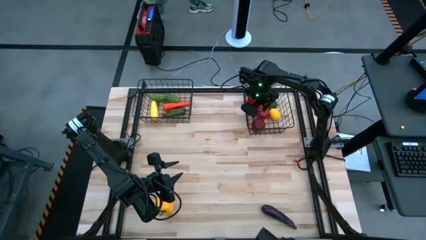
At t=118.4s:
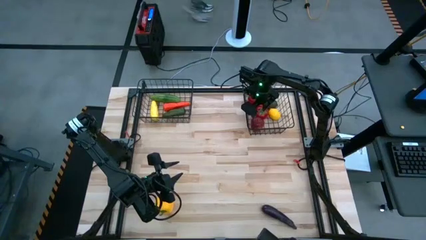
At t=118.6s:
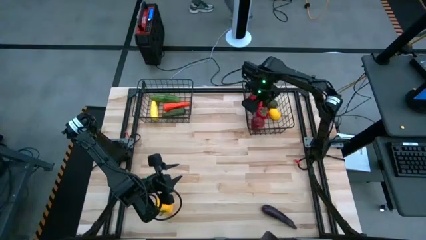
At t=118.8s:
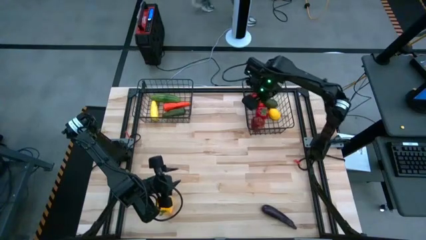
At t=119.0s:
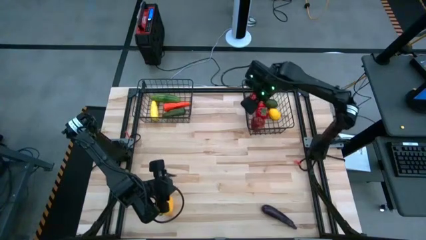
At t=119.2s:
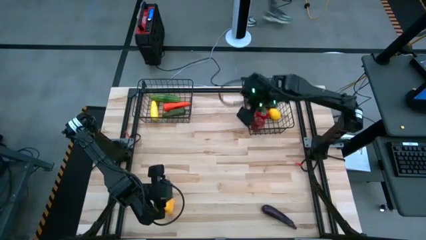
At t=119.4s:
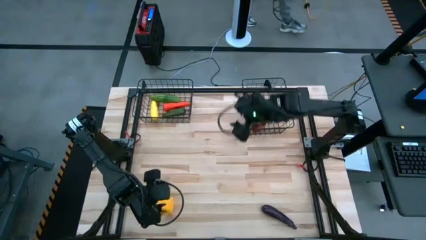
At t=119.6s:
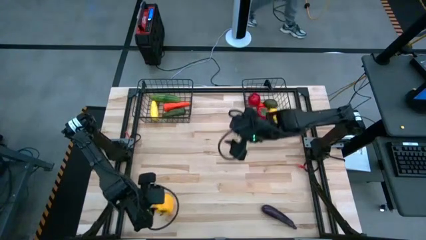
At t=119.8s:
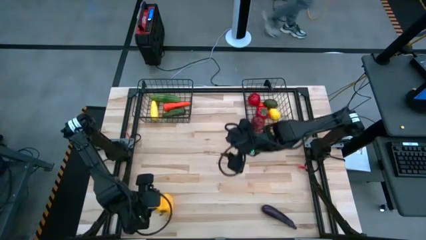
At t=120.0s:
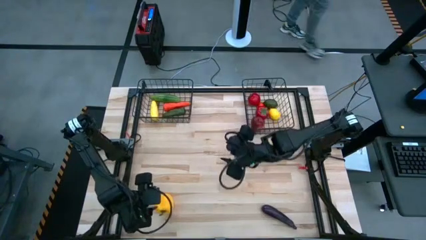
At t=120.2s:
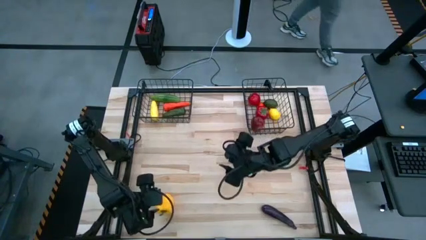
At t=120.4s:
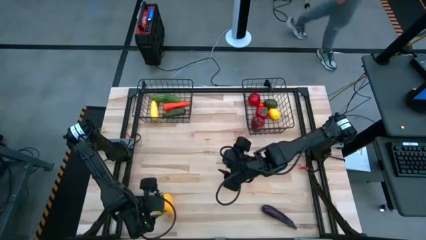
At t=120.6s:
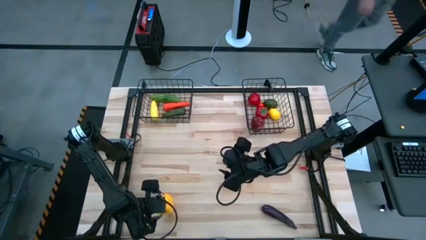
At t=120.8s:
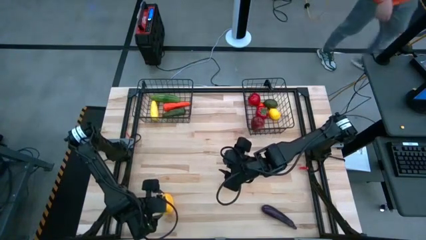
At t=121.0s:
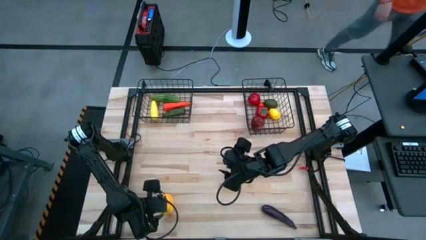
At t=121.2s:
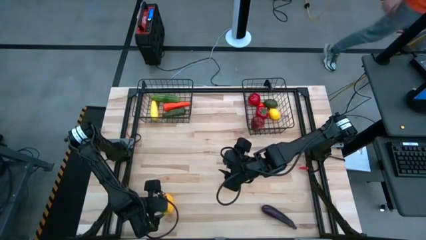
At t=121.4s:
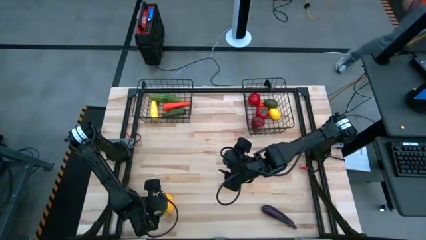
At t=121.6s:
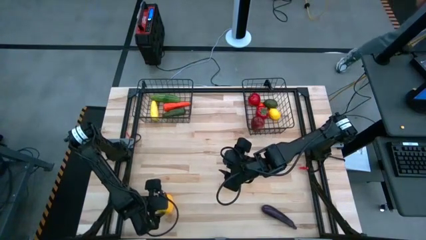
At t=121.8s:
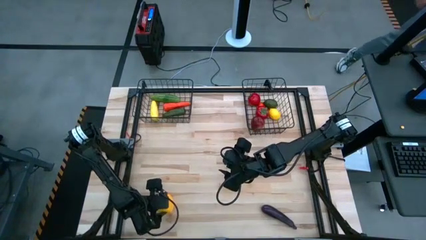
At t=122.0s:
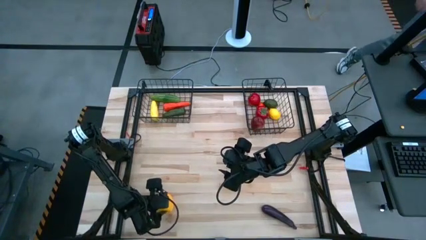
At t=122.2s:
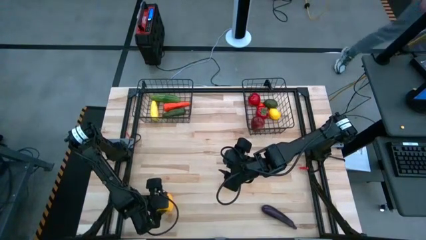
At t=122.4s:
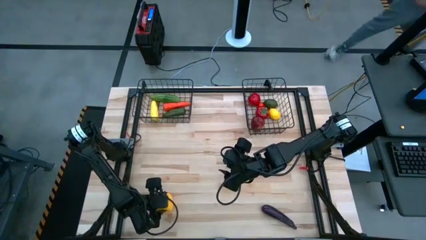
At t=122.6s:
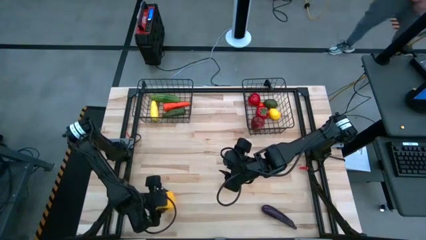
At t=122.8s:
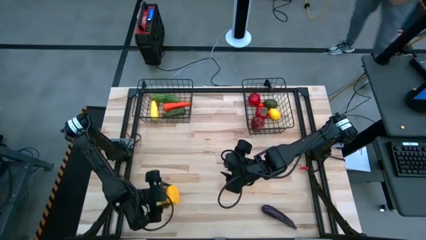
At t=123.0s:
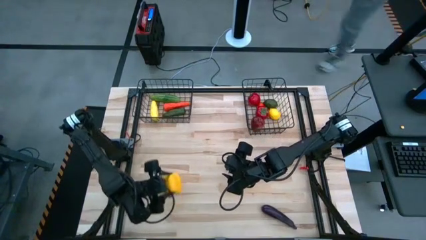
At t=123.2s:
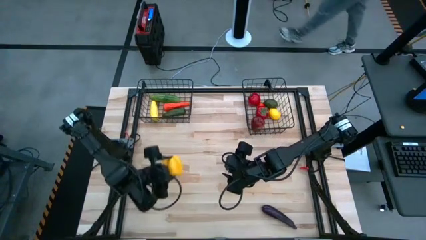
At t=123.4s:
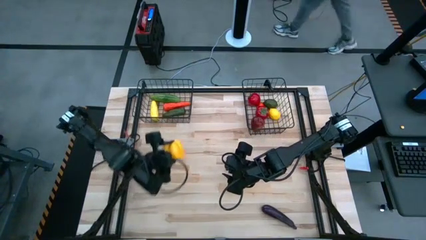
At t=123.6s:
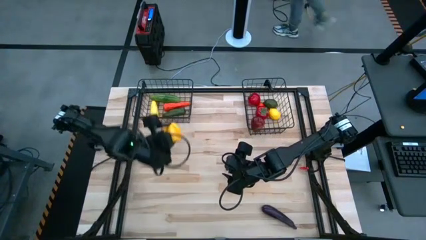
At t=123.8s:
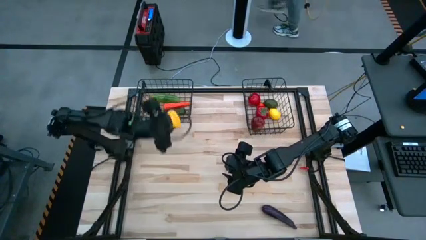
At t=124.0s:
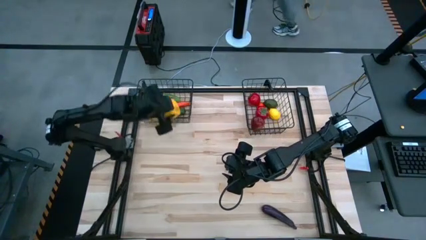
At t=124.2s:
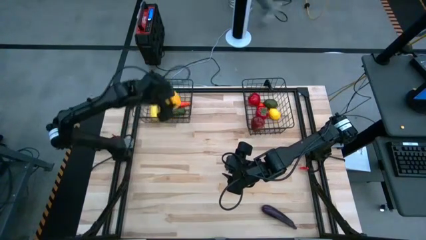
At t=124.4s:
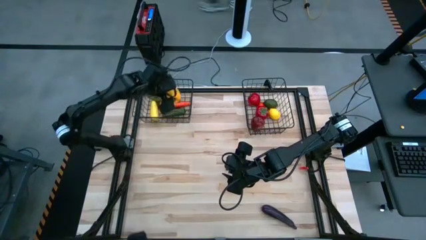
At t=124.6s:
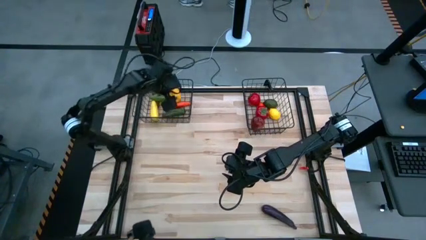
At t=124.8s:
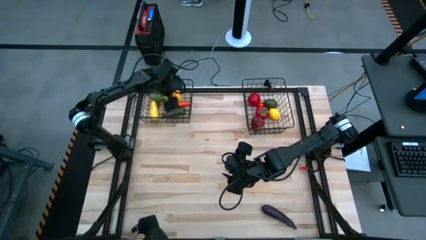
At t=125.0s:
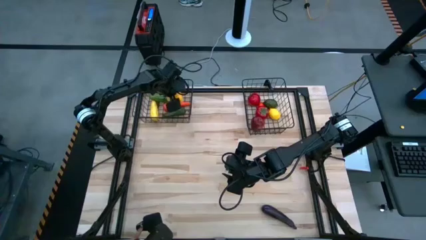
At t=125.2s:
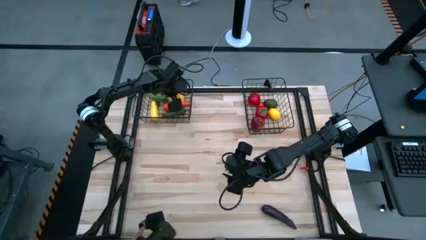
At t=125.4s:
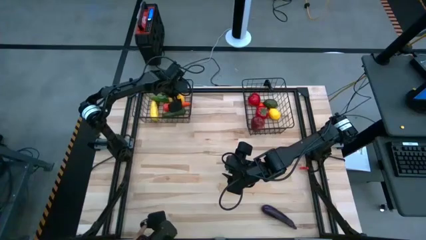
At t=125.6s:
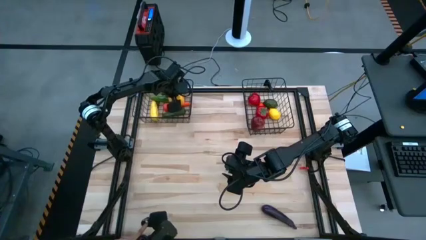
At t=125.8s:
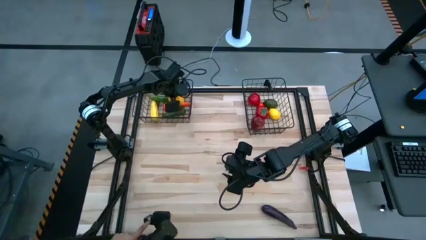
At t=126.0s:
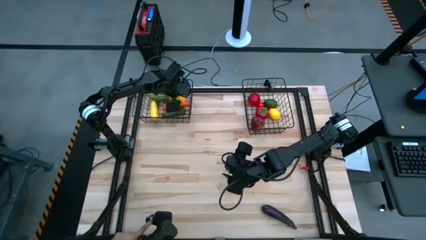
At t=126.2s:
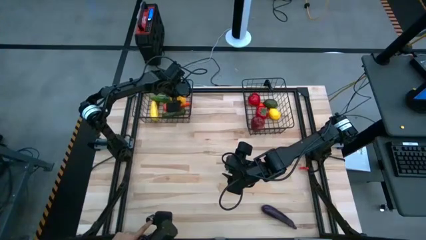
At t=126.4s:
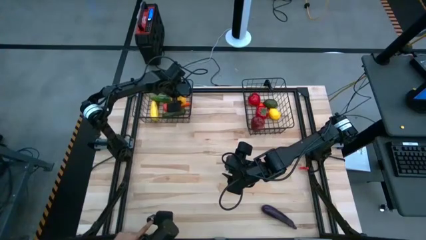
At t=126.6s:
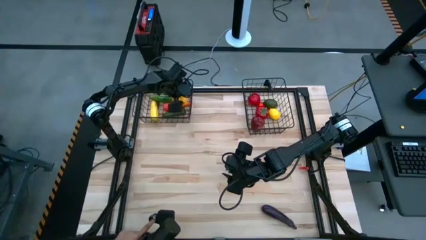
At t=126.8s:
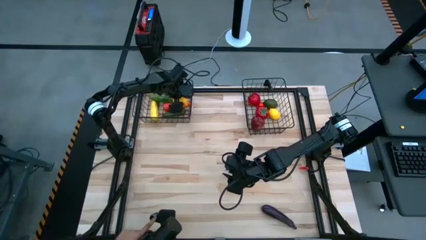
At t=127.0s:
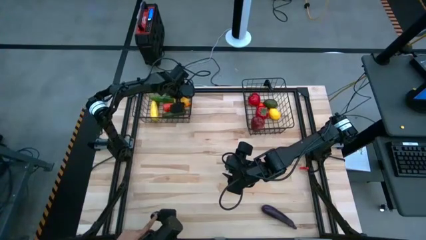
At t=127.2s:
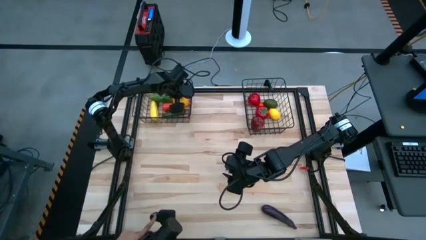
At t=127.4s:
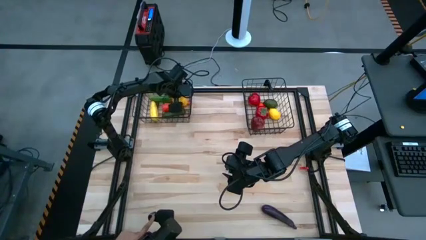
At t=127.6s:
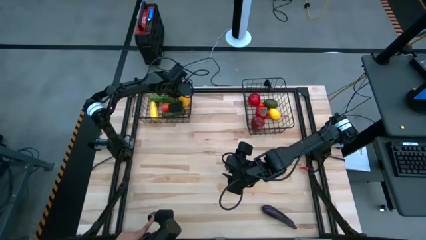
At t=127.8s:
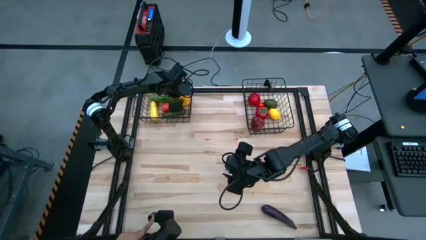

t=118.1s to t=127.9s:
Task: Sort produce into baskets
Put the yellow bell pepper into the left black wire basket

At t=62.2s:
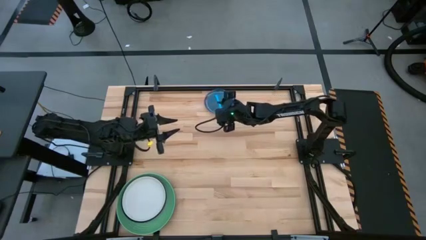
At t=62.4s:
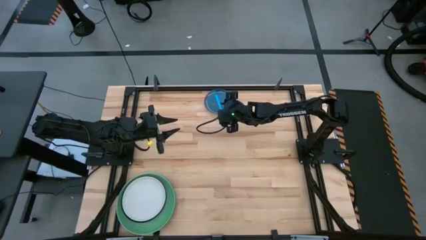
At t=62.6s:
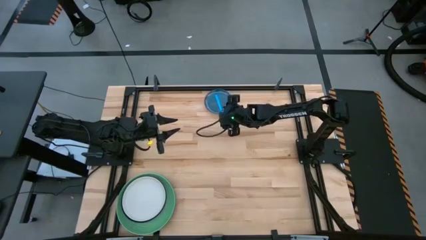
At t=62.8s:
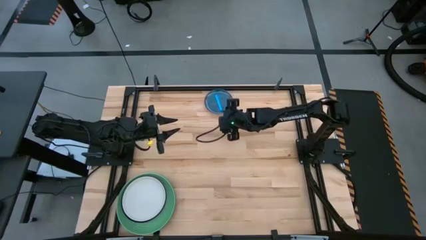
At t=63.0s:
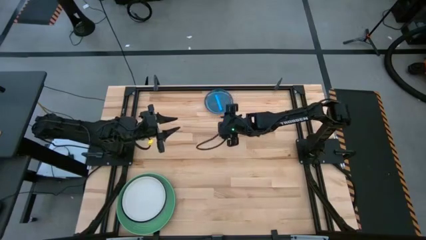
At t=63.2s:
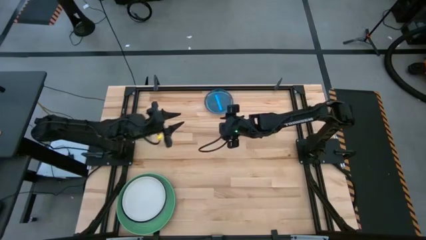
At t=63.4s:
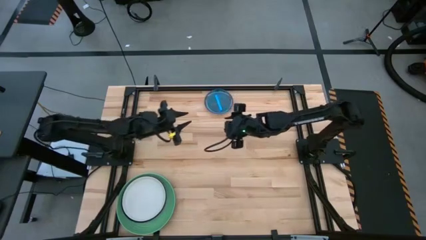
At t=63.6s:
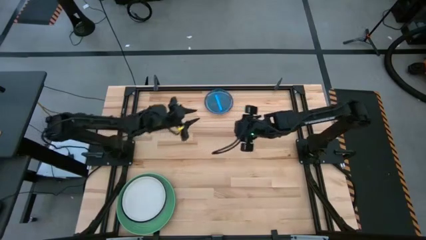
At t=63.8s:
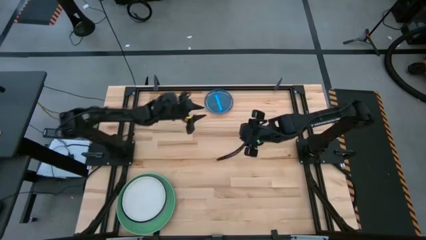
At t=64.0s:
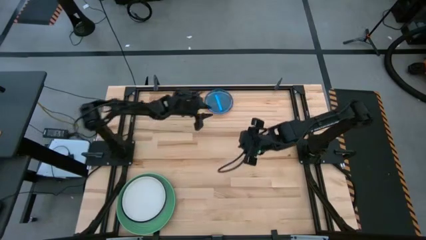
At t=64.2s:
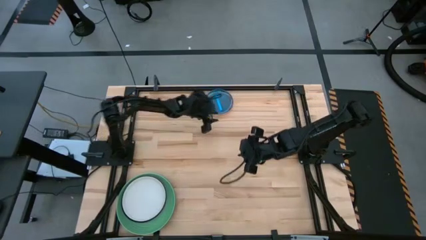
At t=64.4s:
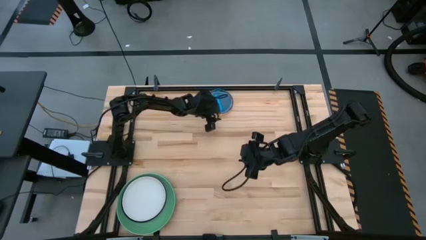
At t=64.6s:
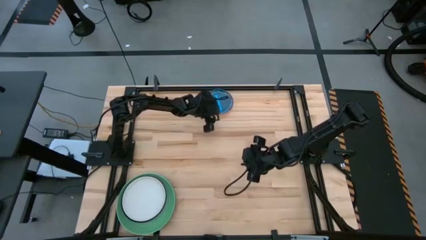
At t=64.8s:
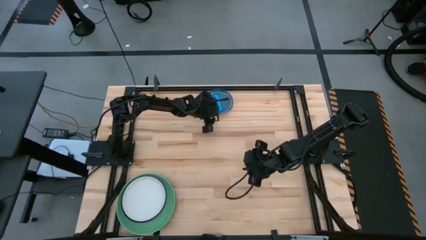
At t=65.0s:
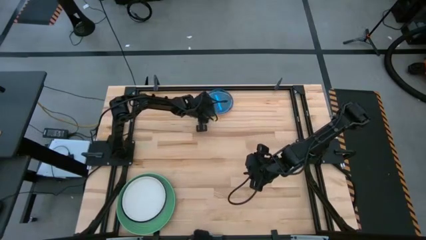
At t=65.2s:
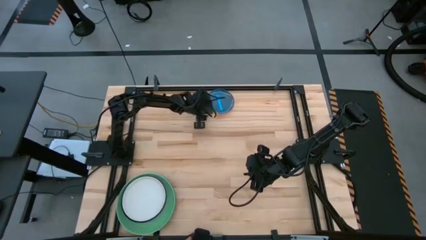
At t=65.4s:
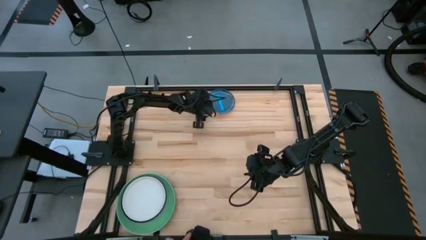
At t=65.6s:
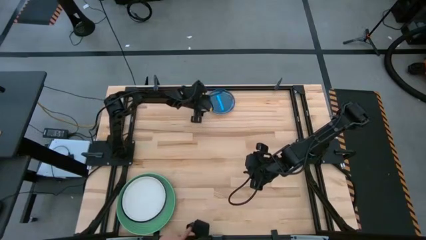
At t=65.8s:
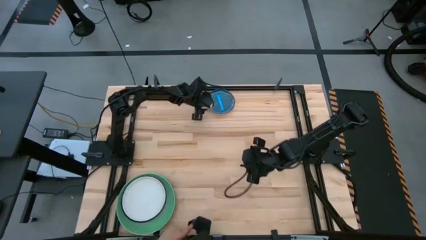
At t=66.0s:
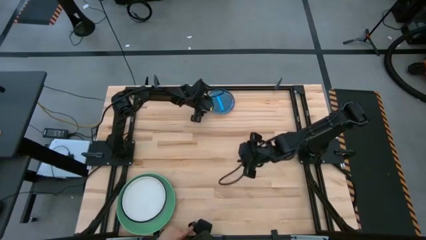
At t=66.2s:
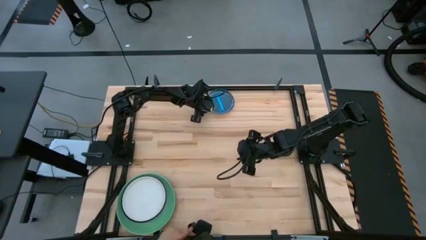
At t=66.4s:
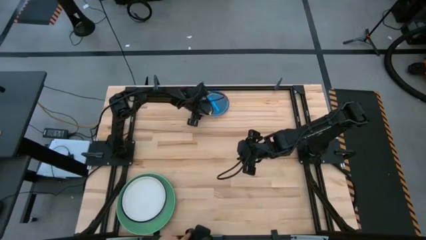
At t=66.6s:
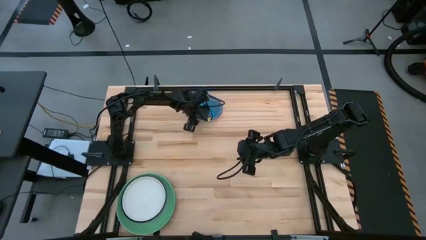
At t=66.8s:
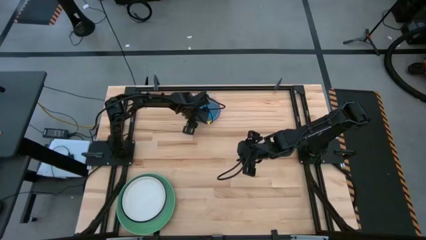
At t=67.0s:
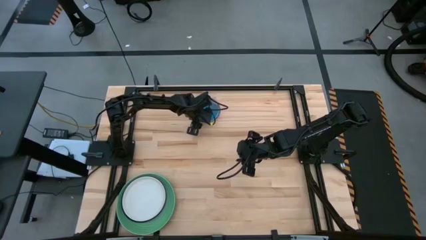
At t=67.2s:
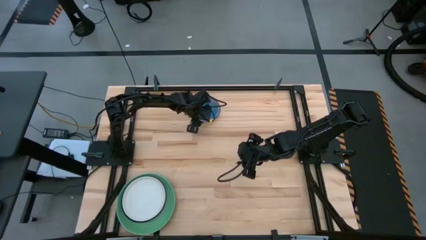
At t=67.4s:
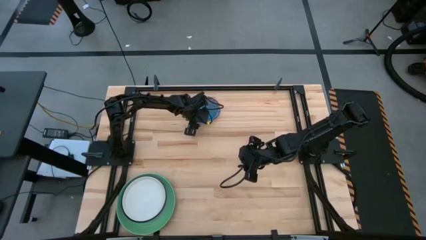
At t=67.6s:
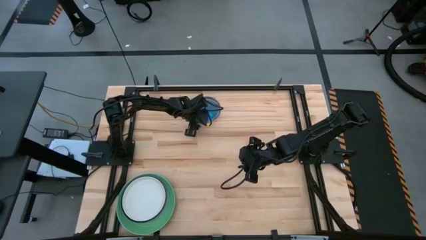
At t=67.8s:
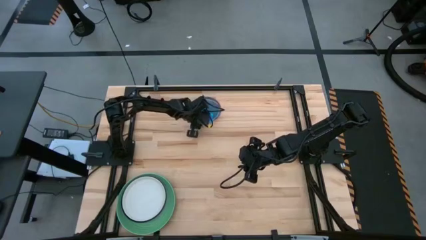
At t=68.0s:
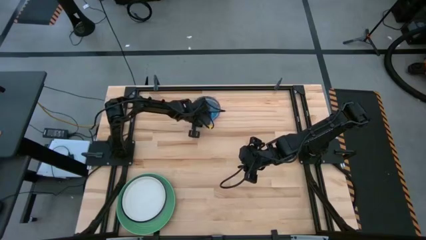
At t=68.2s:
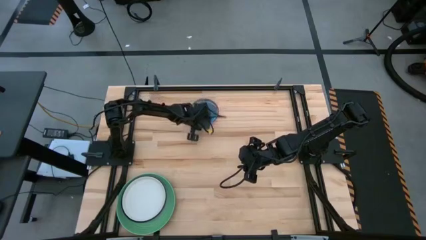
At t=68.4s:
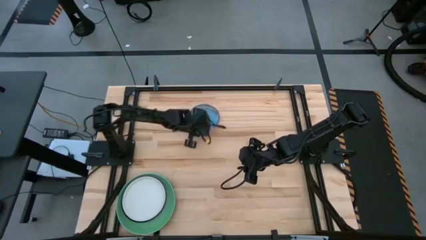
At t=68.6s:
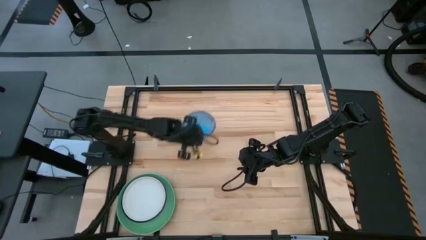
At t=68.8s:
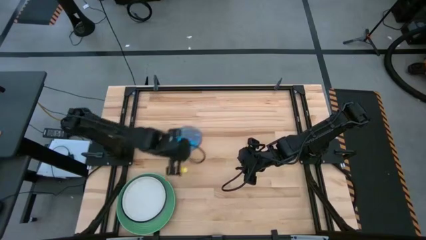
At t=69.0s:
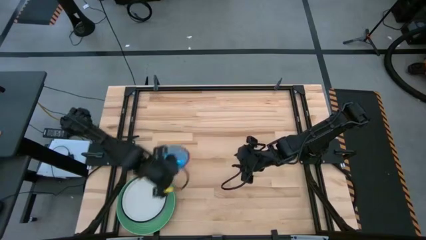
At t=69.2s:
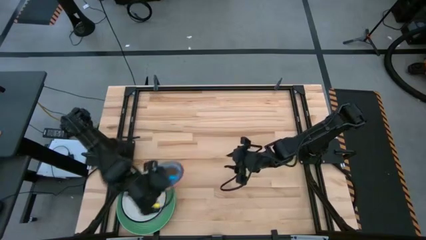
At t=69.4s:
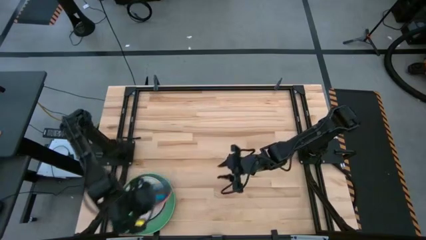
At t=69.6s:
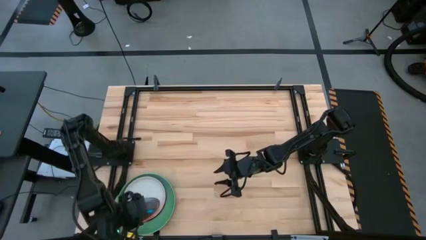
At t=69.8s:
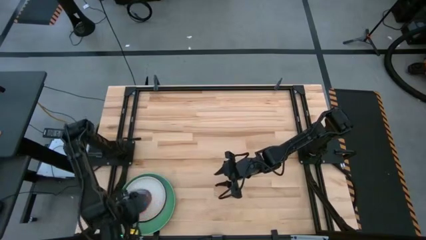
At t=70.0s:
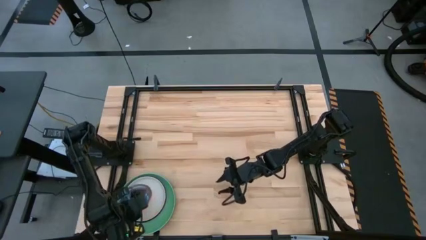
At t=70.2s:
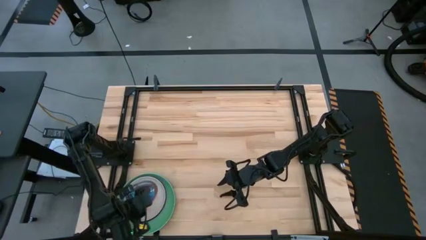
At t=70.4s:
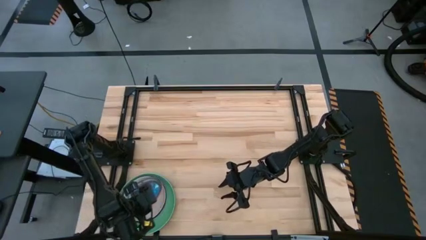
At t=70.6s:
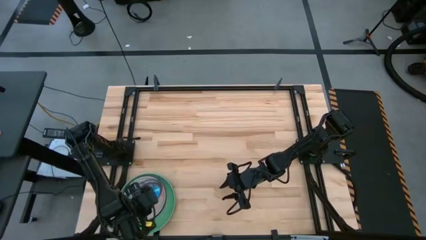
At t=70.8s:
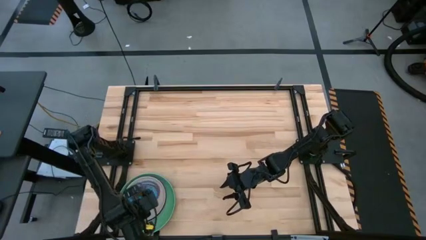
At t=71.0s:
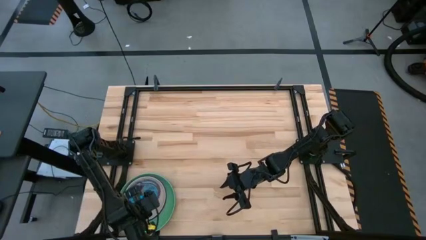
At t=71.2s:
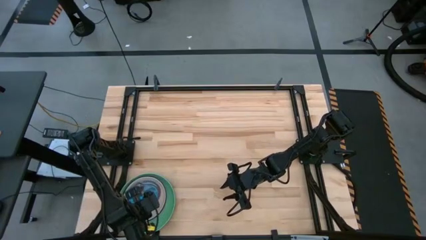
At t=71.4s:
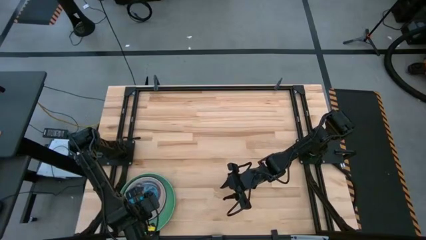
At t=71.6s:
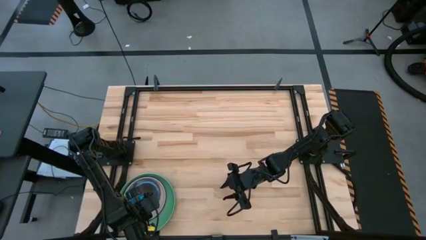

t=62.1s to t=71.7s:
Task: Stack plastic plates
Stack the top stacked plates on top of the white plate
